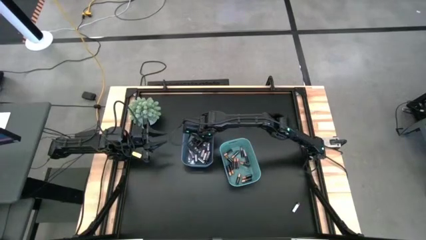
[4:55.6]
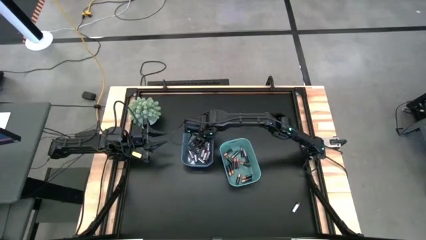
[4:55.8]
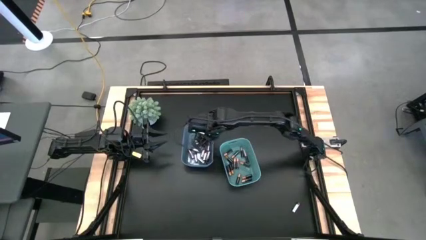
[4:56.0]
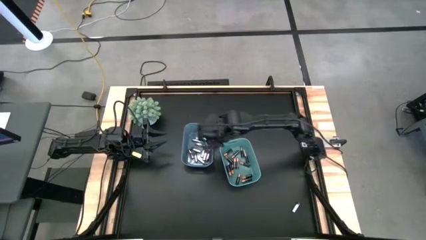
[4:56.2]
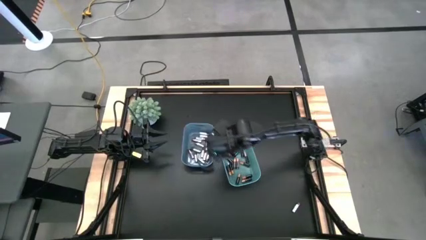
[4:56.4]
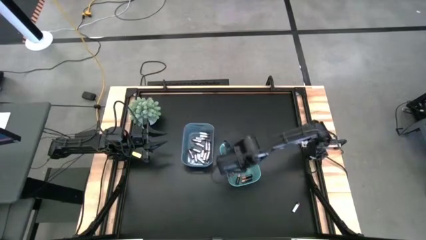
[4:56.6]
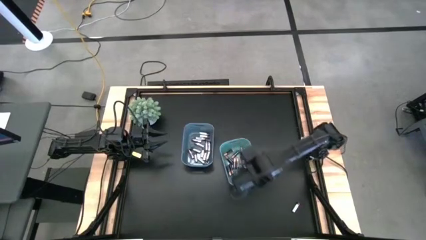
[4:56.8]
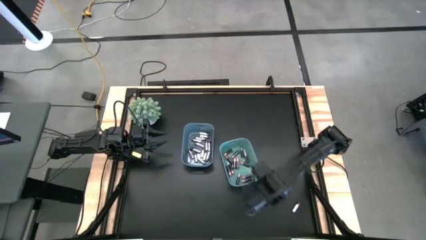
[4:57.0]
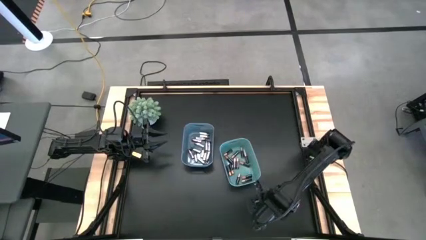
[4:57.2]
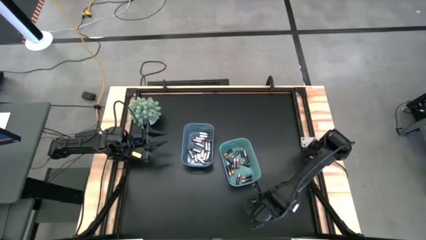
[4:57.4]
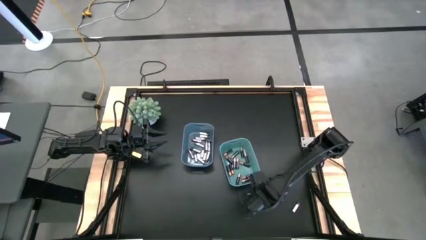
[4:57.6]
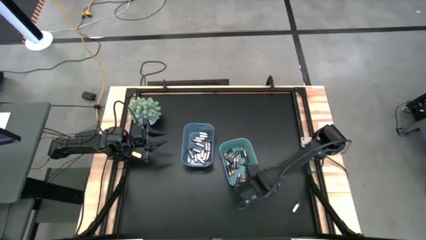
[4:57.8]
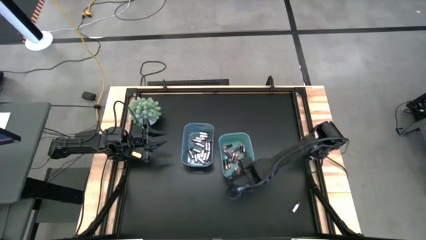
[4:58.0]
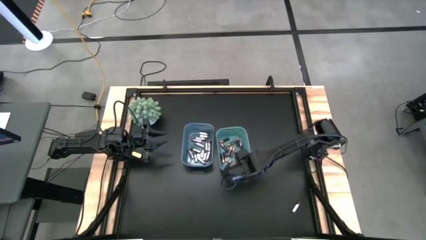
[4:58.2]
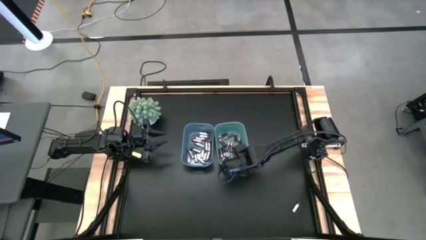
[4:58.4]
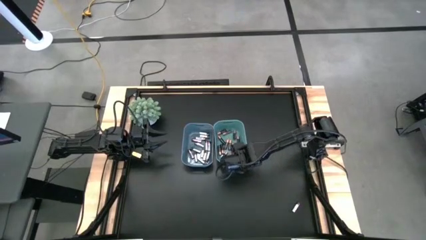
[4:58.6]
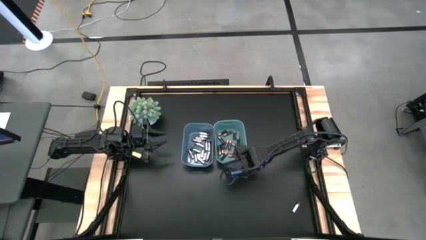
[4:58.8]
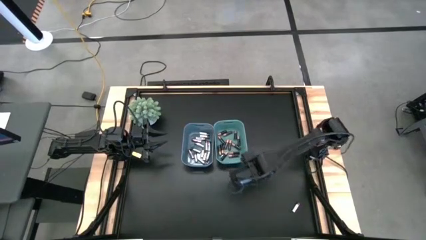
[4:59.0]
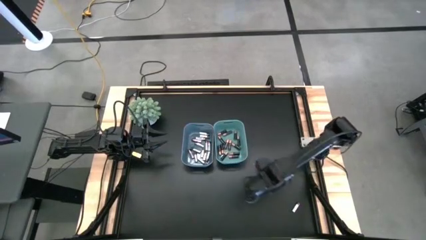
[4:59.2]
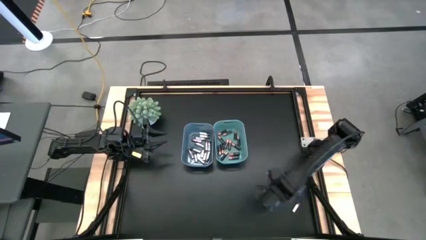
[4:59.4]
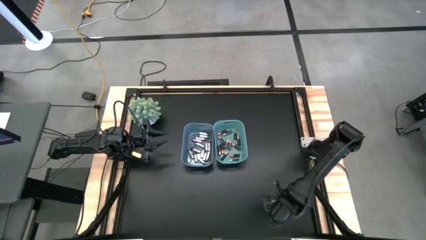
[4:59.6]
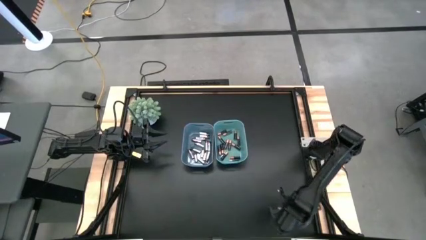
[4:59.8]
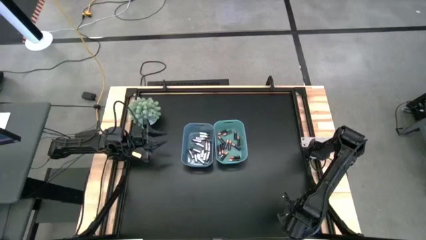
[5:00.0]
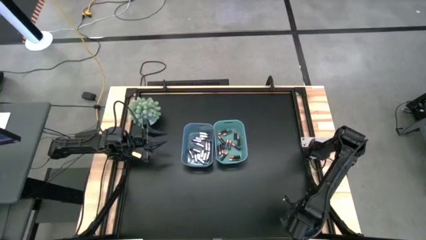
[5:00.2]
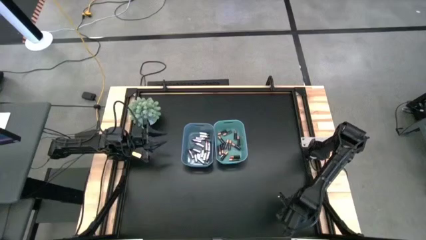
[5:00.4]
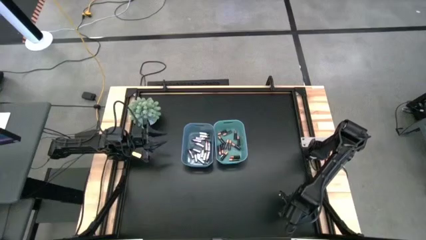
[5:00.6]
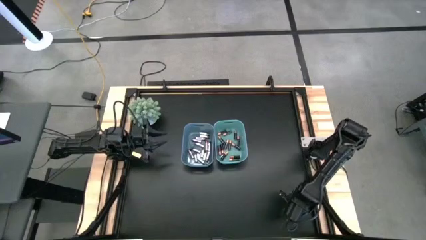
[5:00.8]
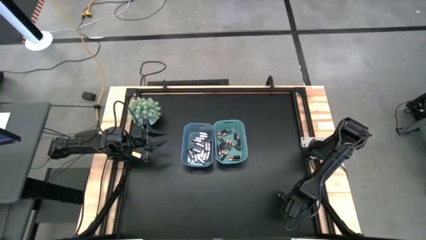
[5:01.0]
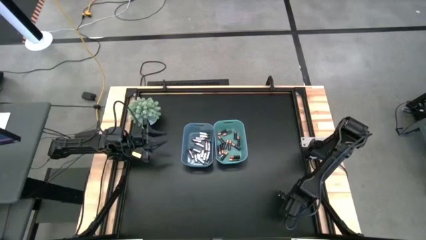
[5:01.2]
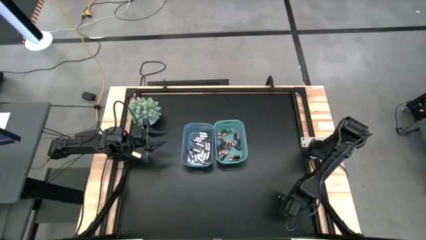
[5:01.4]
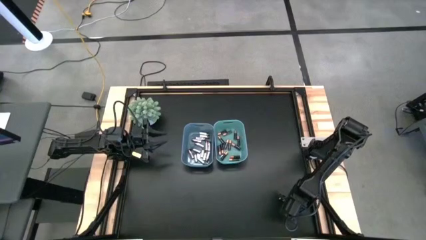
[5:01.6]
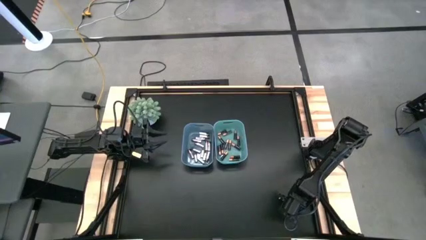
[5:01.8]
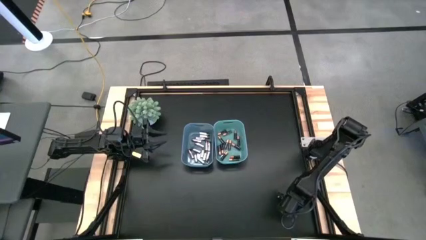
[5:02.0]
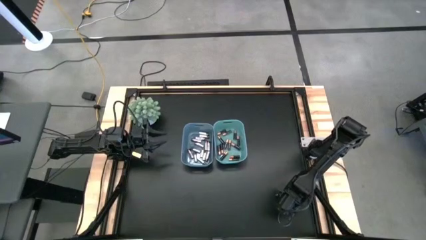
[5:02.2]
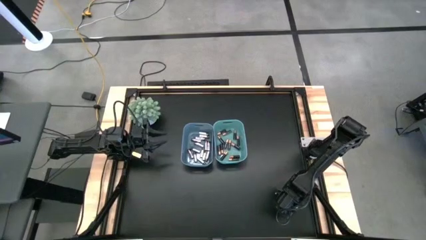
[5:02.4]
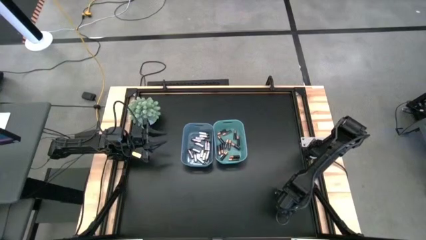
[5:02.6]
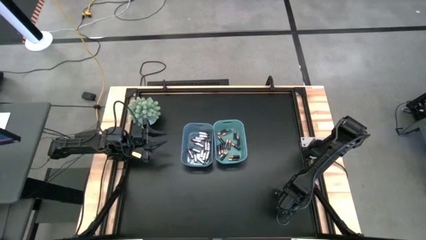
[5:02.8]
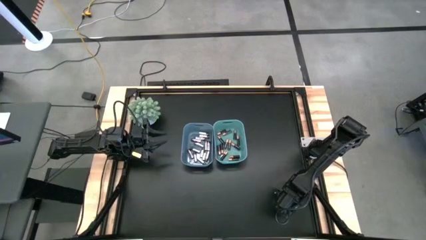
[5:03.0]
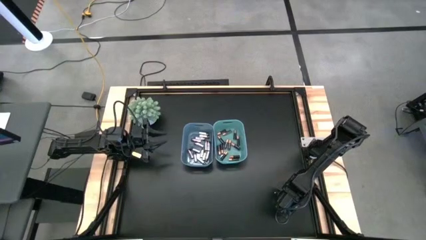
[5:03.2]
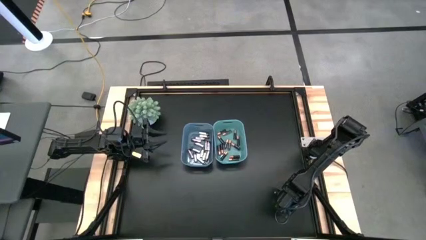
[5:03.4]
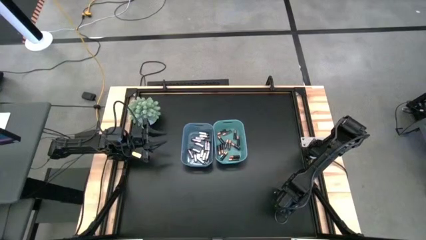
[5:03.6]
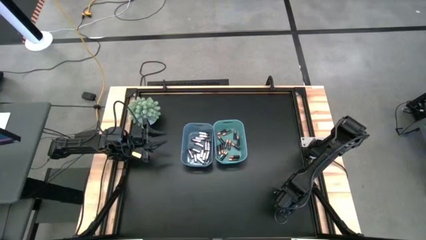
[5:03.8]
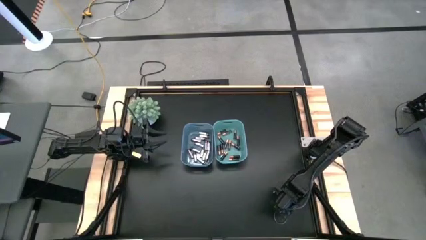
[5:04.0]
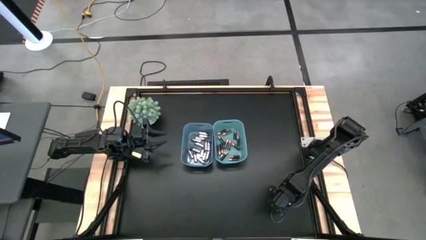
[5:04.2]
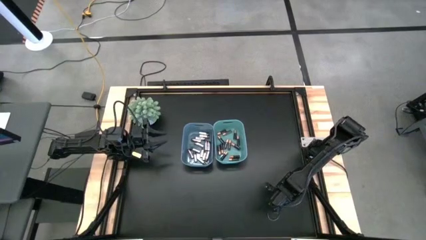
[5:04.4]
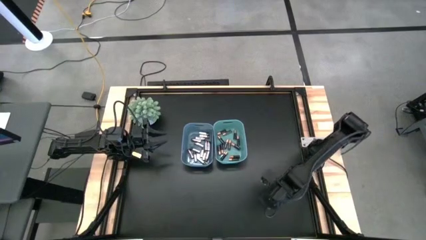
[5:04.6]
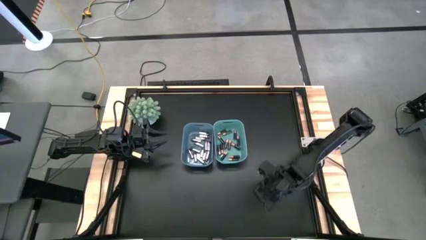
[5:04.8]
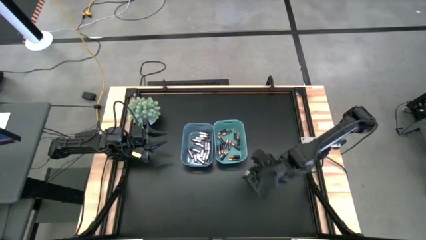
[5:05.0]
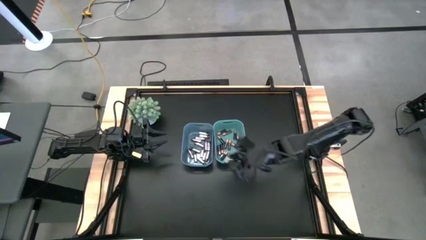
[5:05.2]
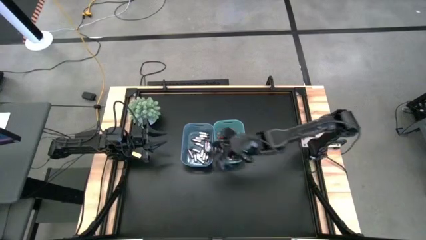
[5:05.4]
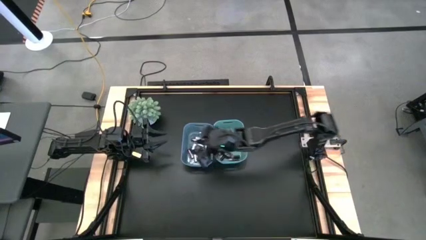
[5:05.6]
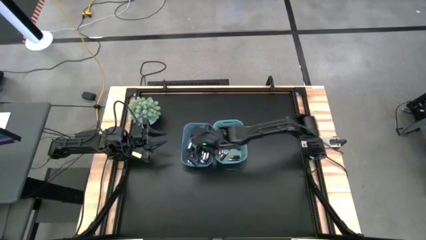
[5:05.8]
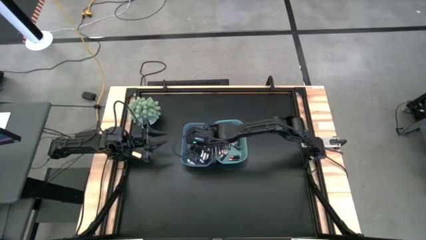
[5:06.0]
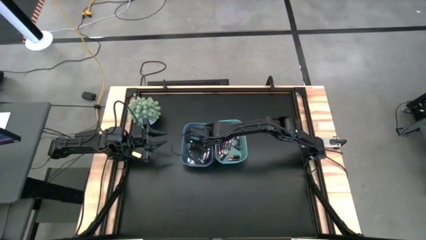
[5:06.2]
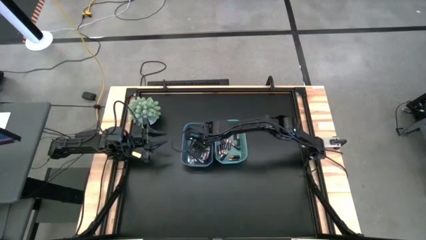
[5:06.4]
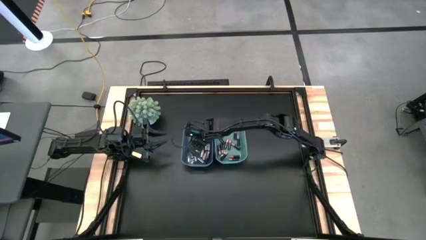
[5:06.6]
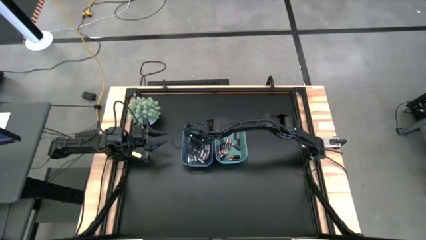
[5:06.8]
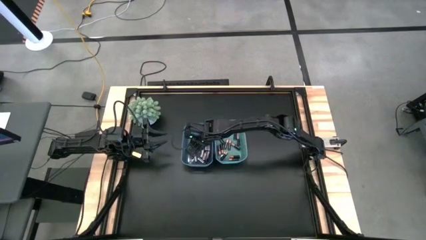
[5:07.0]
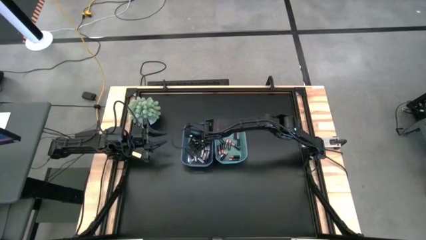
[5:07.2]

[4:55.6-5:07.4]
Task: Sort batteries
Put the silver battery into the blue bin

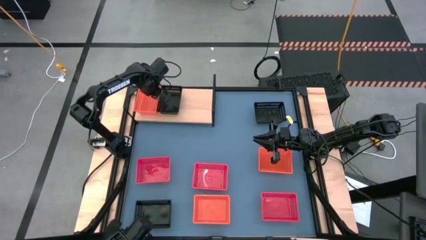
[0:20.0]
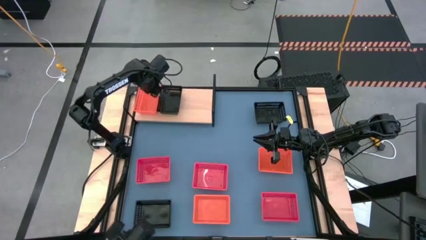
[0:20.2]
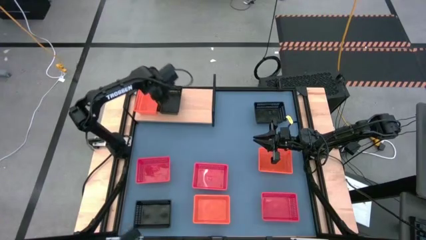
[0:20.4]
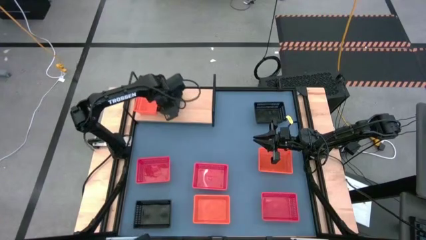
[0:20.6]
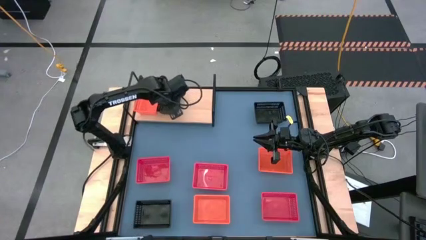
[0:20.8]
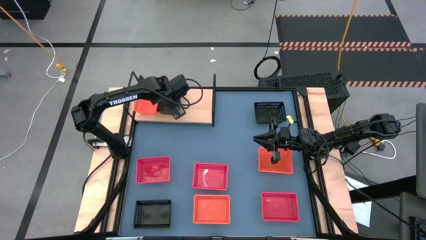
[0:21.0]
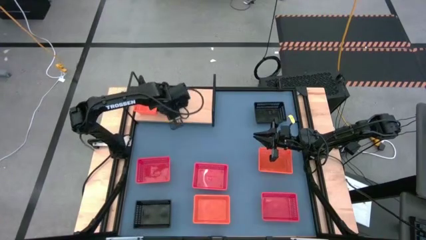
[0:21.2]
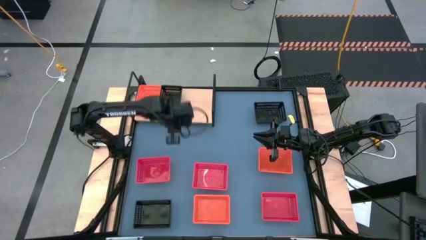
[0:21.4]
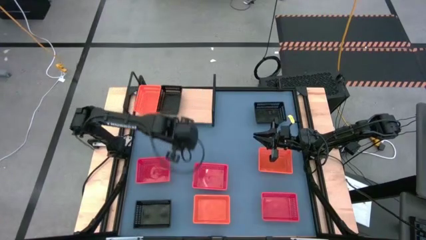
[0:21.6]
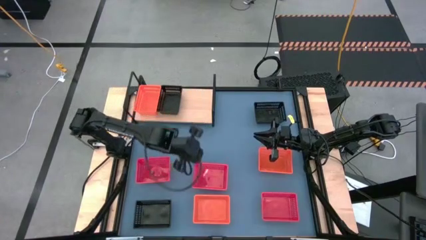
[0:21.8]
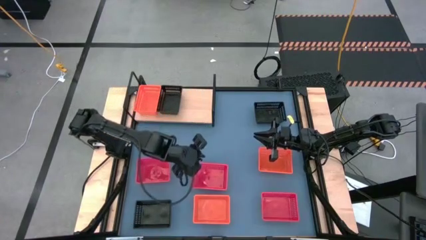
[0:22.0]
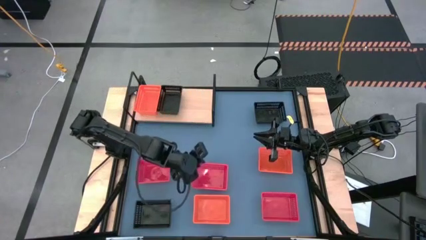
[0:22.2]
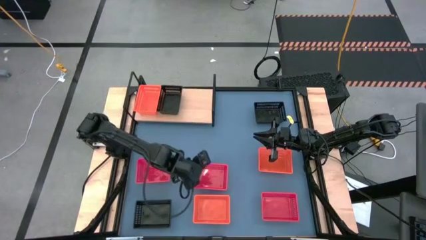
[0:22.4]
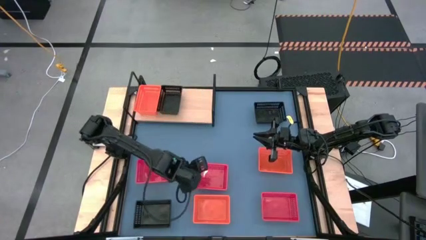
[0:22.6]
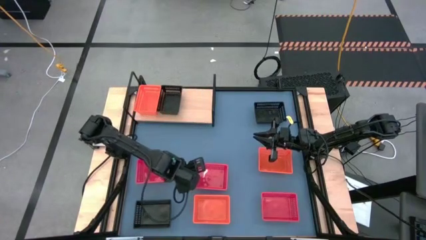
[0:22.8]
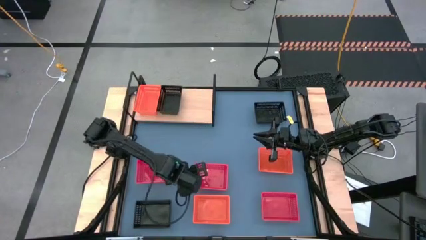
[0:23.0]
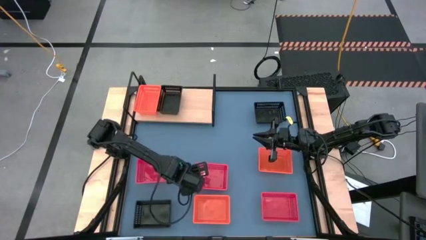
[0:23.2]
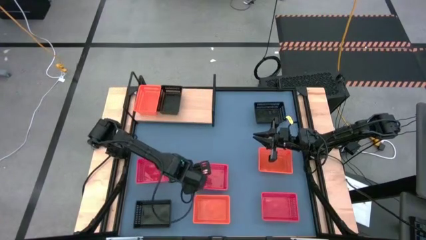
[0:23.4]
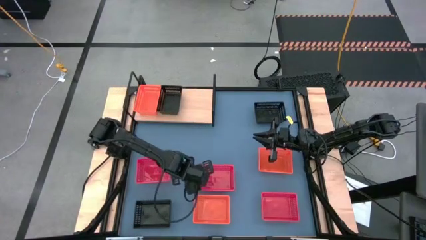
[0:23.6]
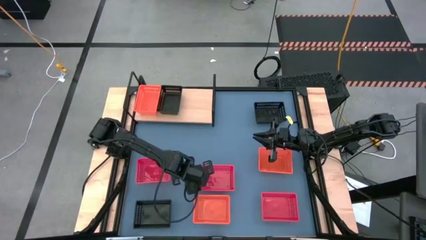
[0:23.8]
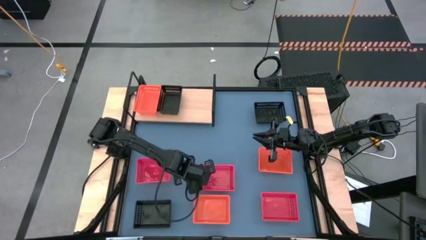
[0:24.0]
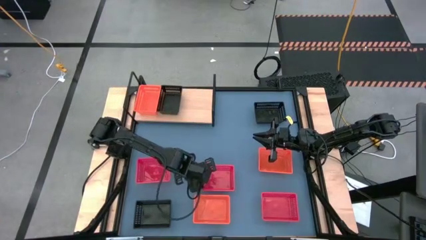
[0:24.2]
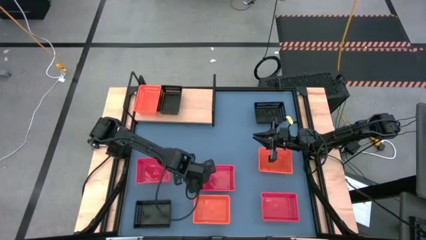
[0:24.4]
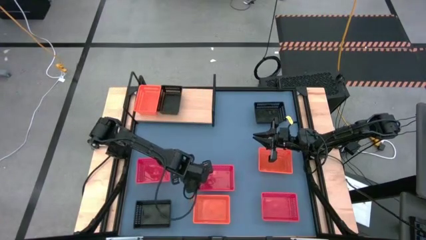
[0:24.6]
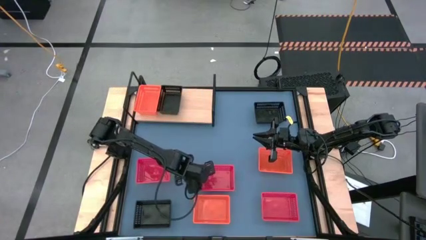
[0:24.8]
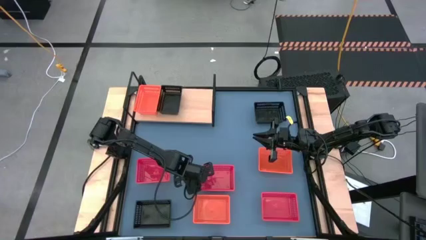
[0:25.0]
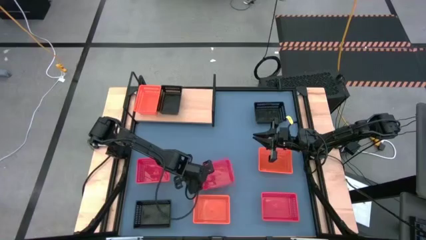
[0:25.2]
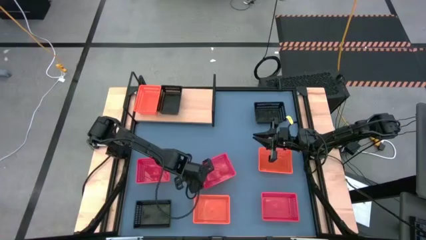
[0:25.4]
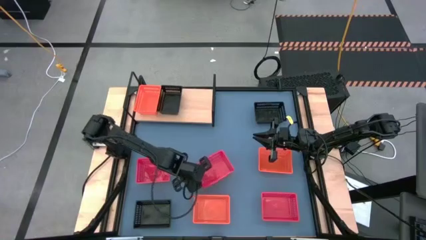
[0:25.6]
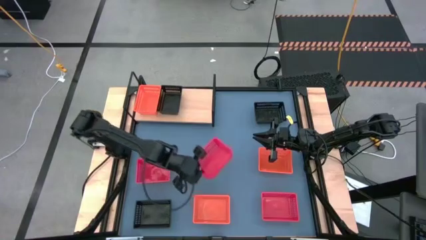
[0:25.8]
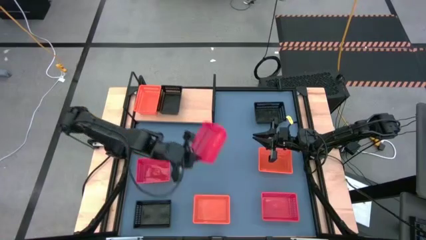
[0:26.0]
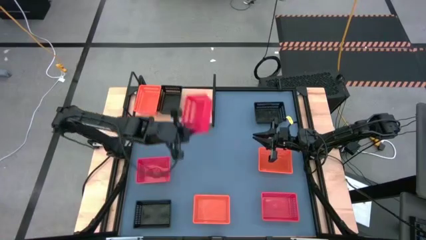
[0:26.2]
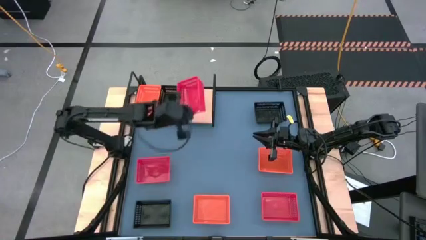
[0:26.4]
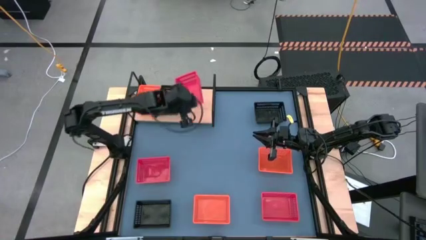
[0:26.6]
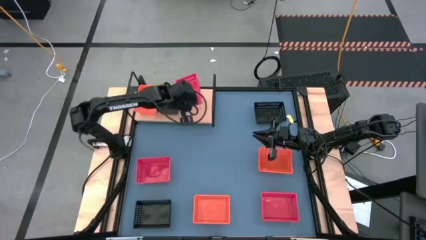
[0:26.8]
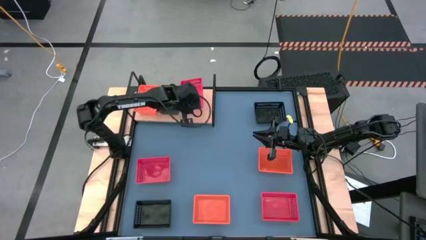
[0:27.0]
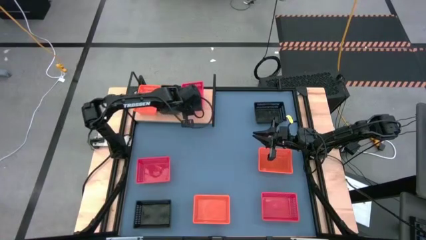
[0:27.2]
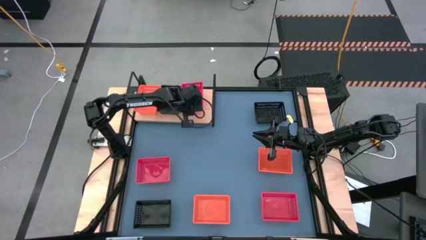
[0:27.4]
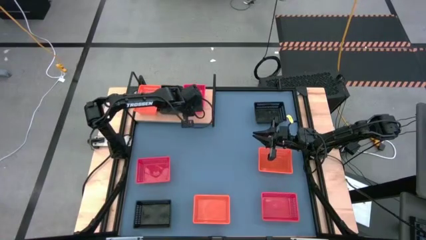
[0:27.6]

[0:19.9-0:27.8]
Task: Stack baskets on shelf by color
Put the middle red bin on the shelf
